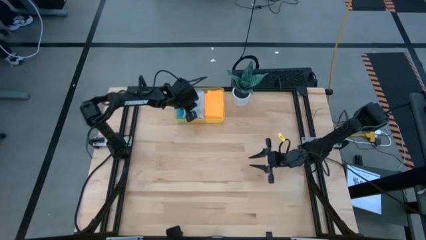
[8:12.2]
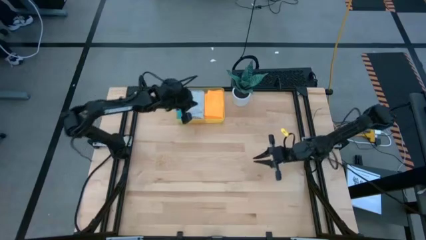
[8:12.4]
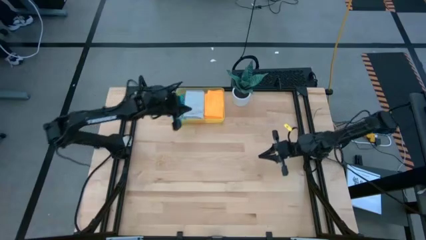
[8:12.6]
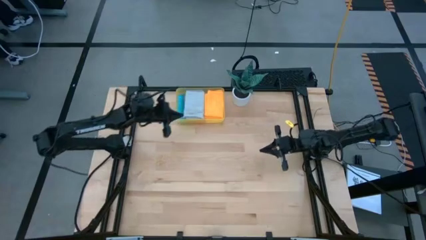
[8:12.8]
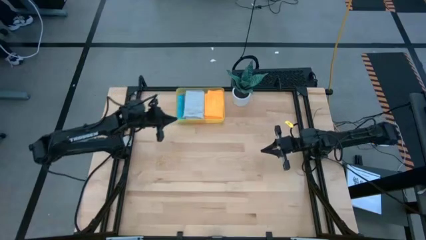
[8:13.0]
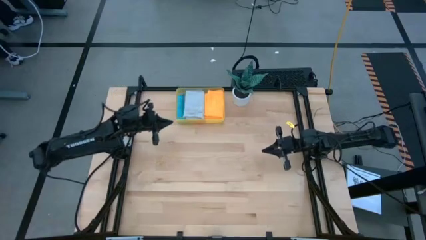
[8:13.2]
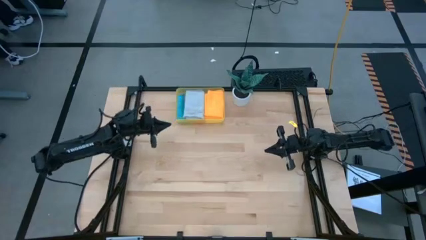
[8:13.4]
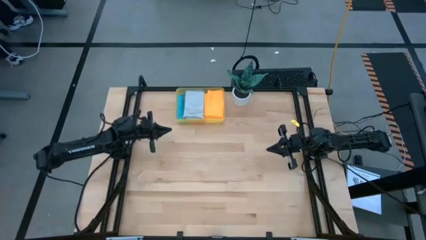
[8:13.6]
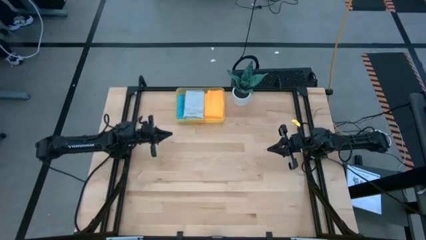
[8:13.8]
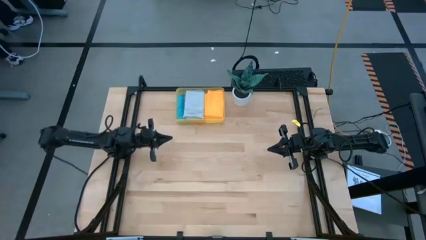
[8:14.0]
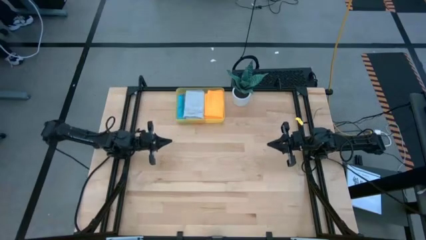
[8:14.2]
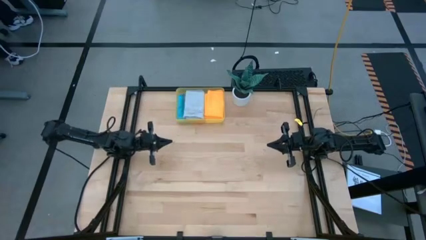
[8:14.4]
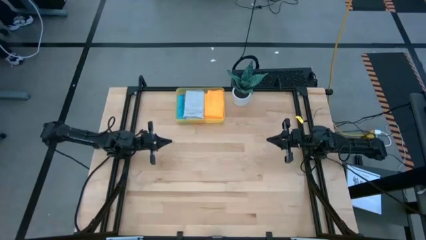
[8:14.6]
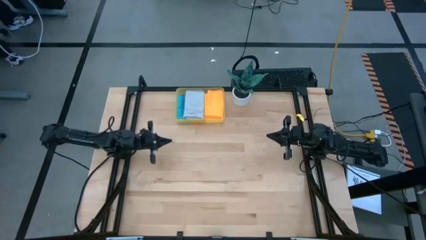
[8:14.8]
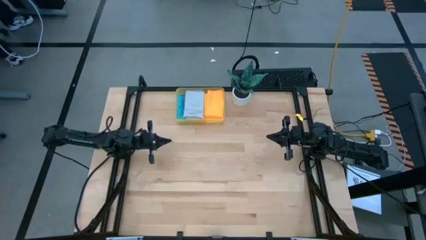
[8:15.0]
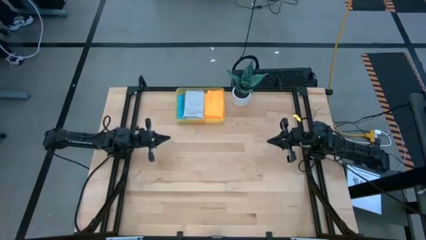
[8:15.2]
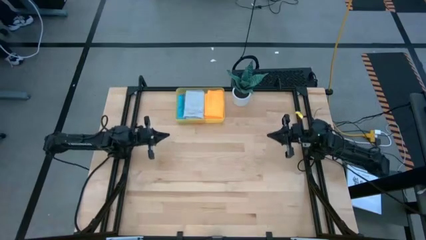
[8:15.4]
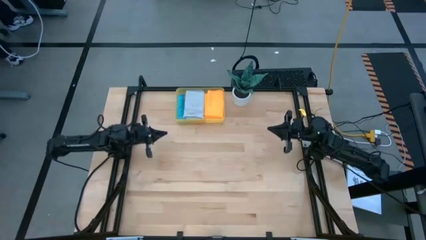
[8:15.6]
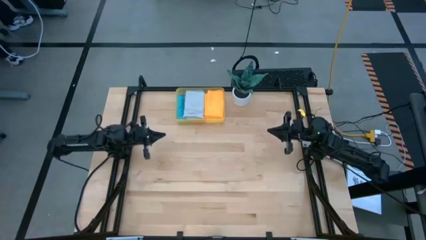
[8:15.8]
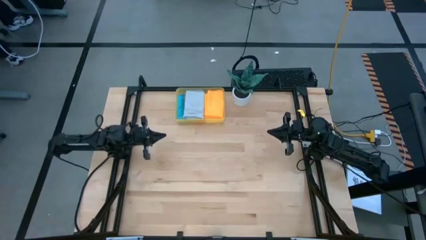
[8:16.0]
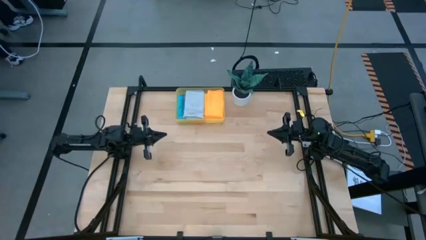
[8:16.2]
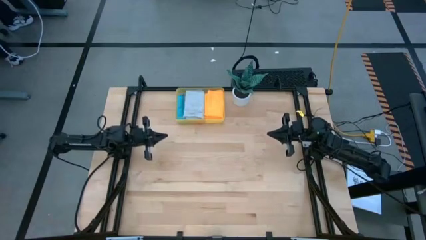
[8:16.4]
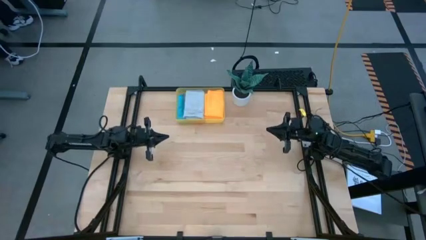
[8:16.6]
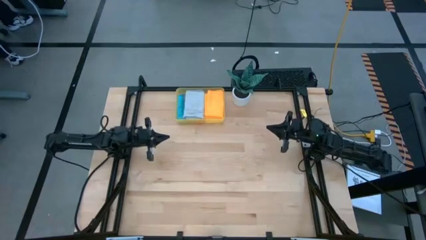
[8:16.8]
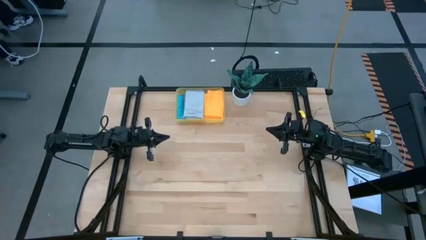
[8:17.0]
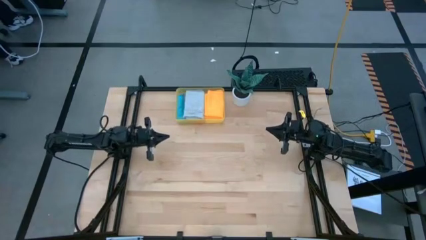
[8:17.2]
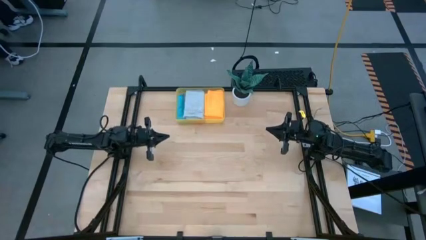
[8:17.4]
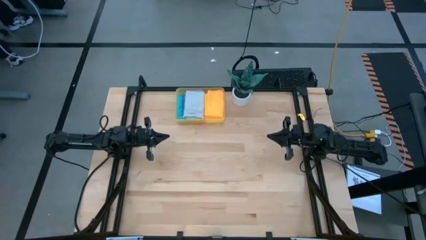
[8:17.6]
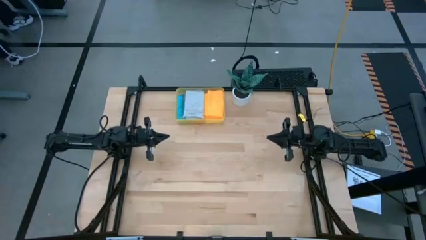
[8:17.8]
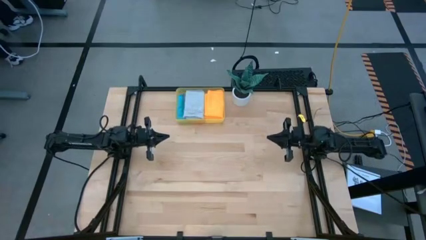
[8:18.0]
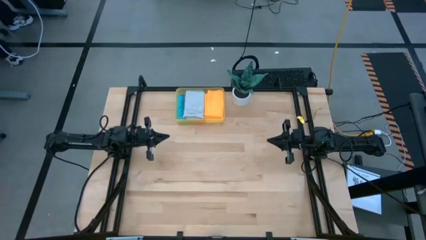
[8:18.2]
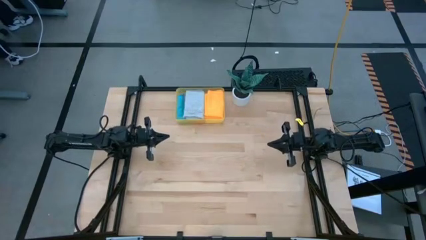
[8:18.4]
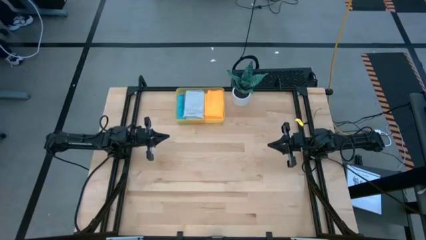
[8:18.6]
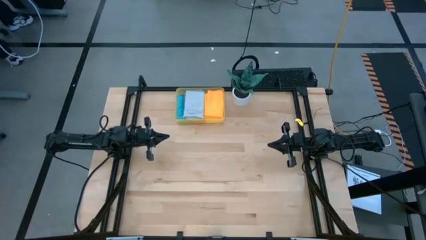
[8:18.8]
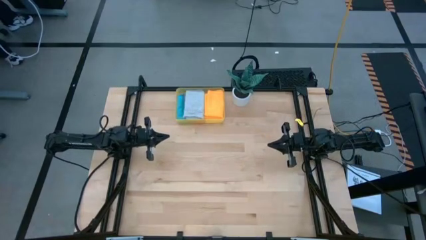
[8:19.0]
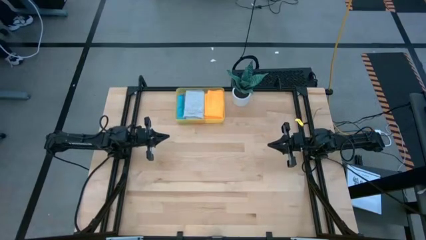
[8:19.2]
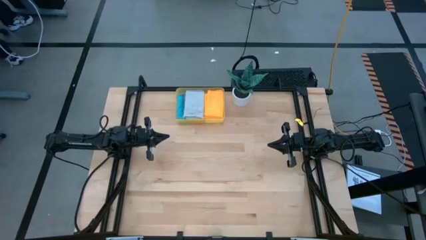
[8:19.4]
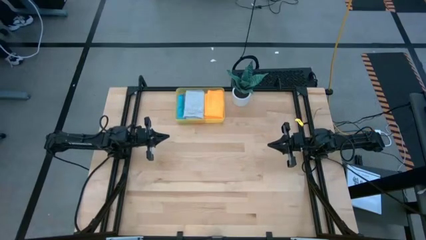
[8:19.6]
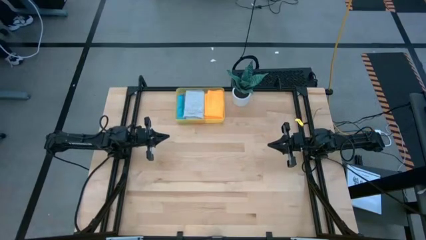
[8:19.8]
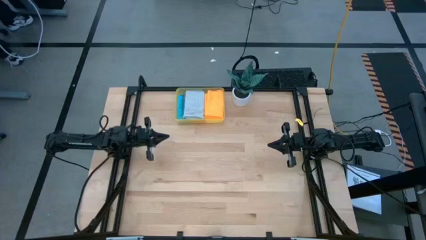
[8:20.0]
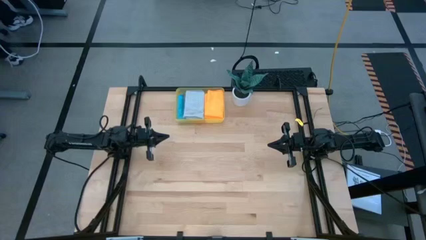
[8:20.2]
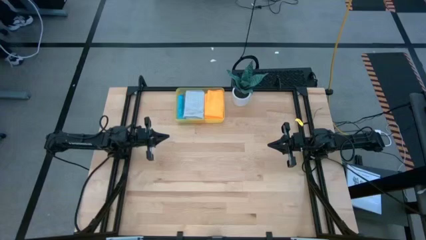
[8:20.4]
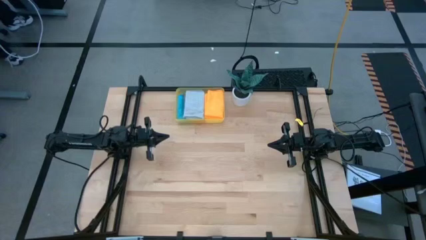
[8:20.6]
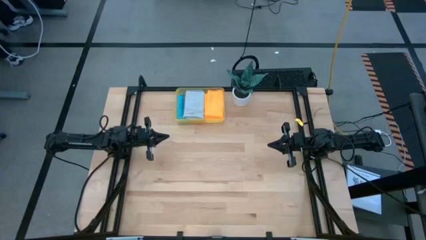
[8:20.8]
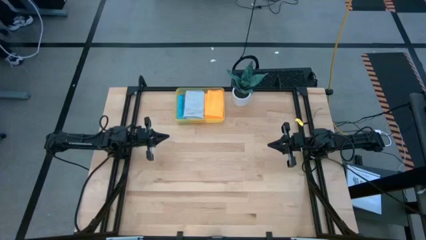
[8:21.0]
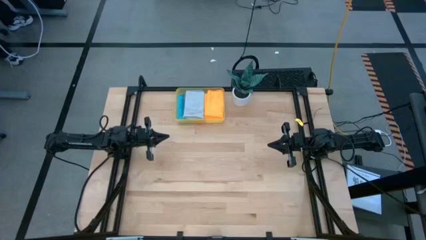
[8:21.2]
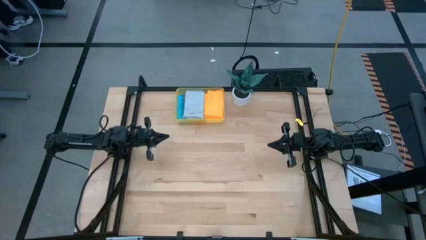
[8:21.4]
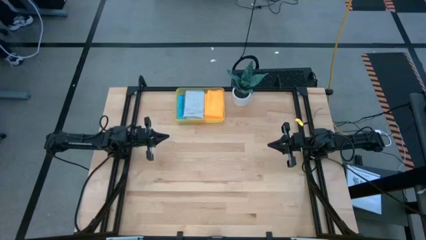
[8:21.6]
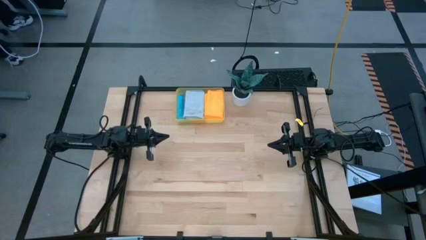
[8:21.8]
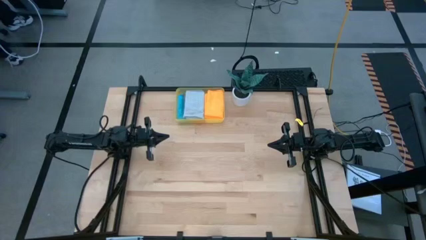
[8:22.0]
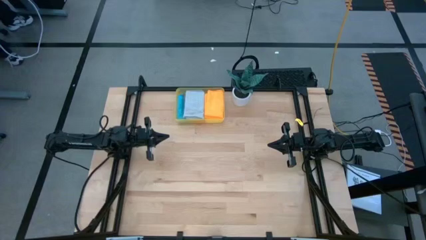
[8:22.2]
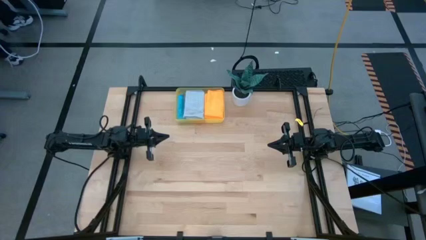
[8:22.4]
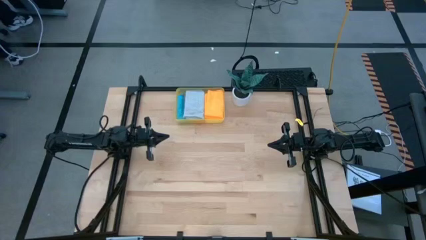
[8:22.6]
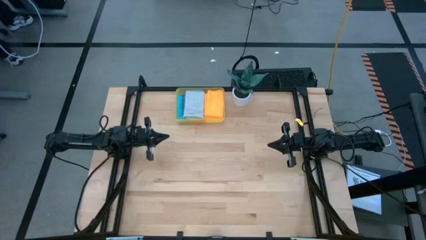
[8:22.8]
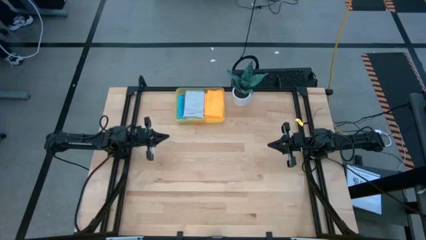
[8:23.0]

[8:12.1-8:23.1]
Task: Fold microfiber towels
Return to Home Position

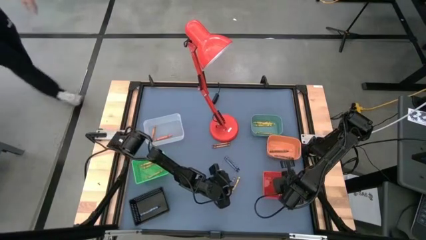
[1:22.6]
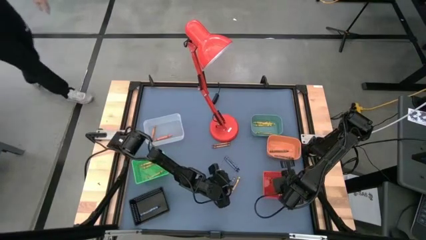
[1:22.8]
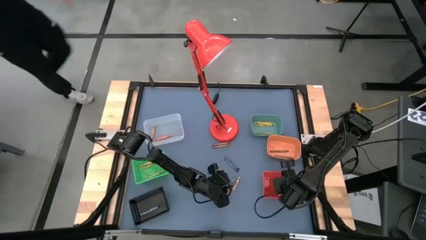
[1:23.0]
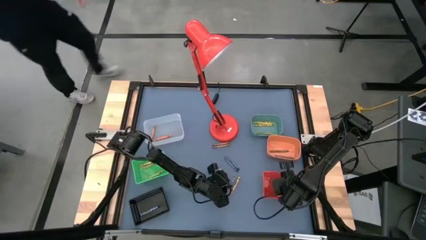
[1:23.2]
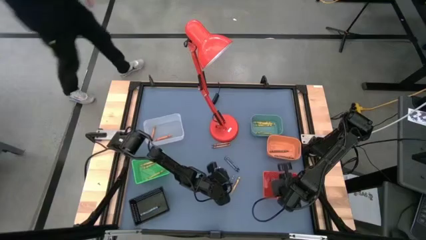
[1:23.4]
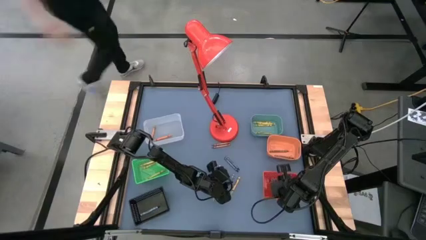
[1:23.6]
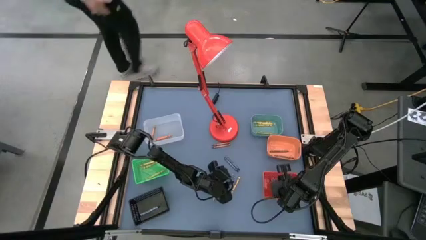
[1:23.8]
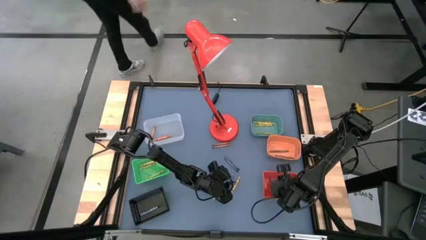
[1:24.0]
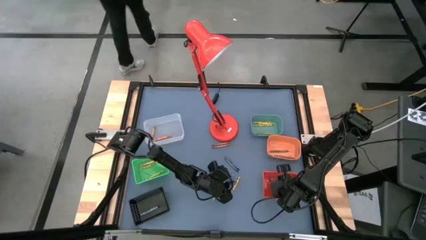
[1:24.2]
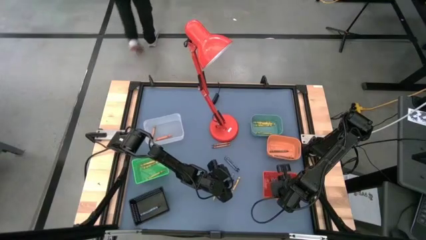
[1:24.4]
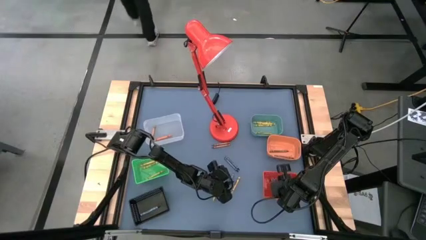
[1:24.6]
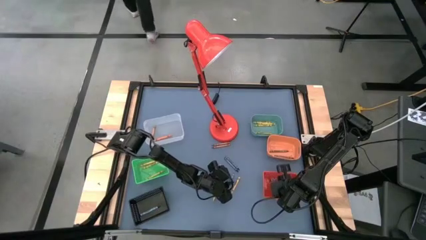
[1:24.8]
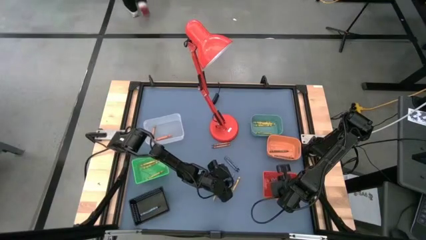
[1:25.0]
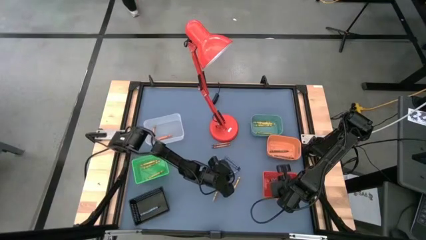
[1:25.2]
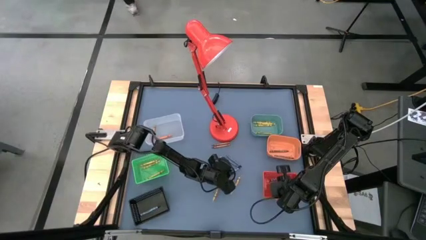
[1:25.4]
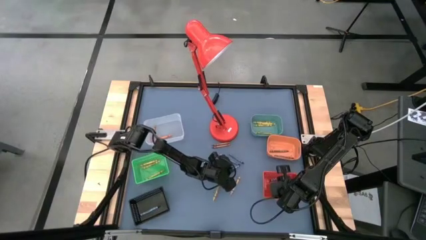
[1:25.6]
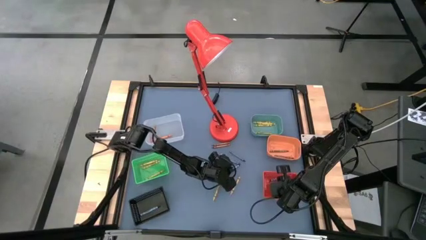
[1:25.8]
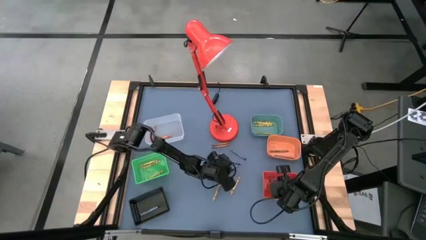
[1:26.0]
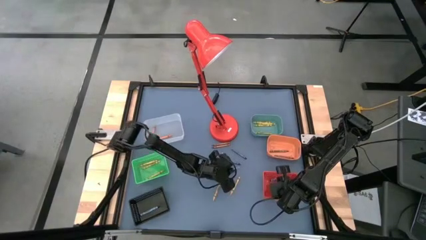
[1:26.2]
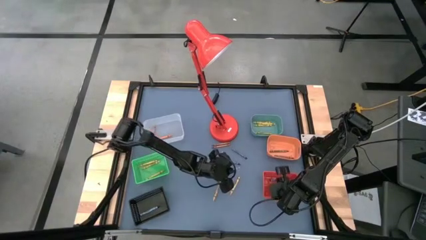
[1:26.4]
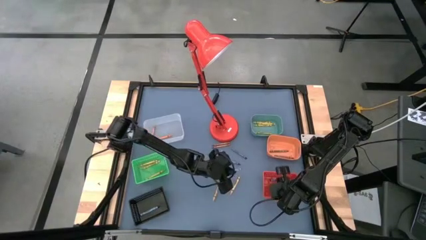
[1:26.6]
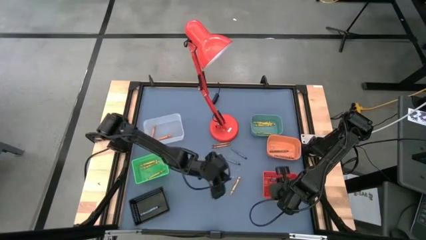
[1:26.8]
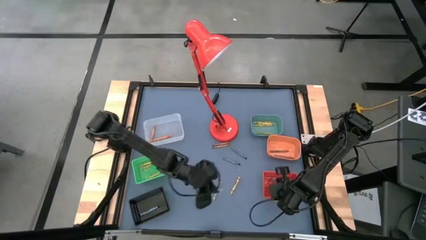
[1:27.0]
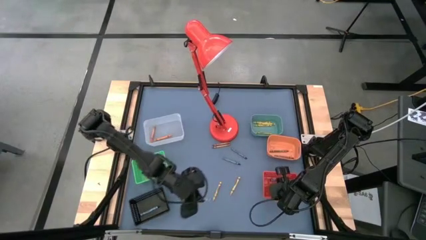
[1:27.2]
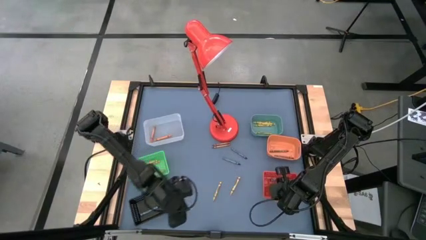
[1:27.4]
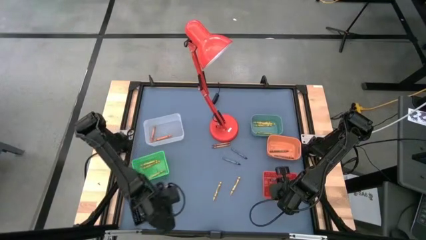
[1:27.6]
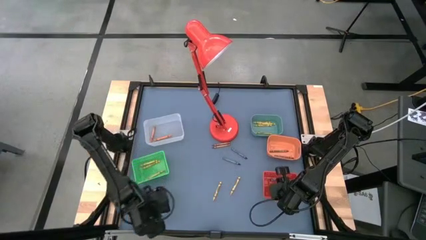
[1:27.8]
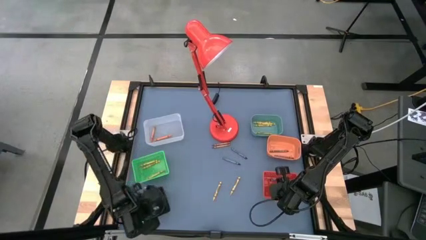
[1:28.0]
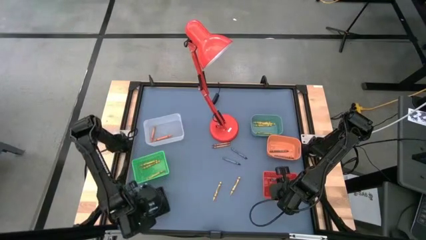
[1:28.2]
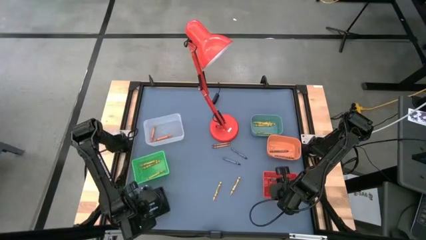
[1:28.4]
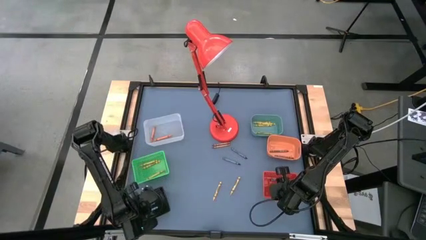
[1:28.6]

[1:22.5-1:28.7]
Task: Sort crayons
Put the blue crayon into the black bin
